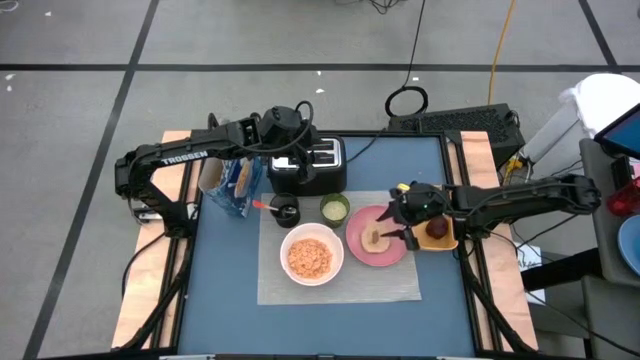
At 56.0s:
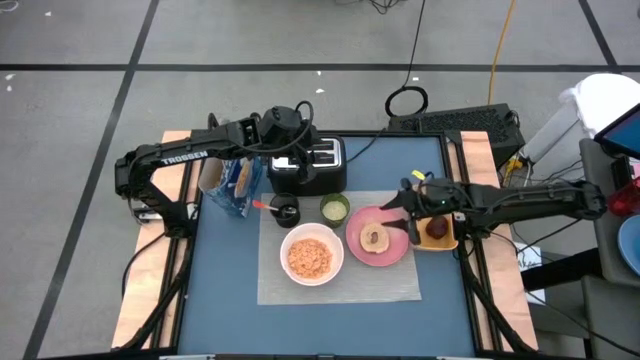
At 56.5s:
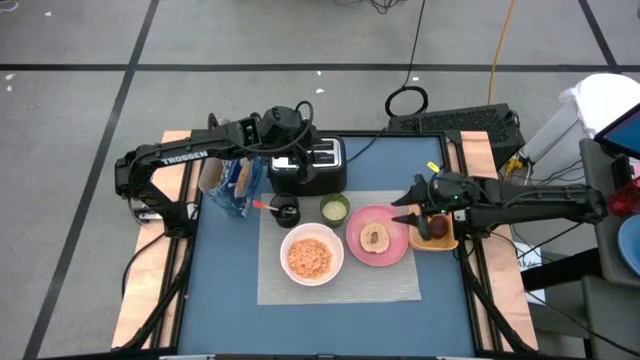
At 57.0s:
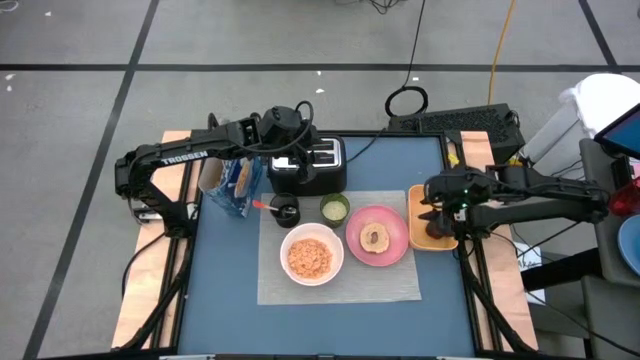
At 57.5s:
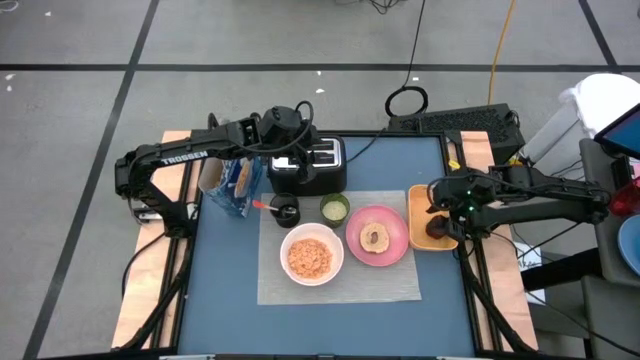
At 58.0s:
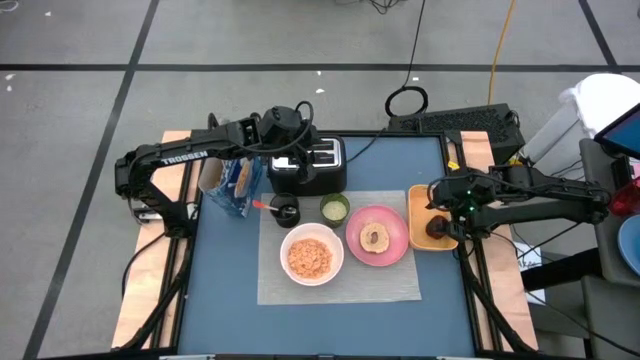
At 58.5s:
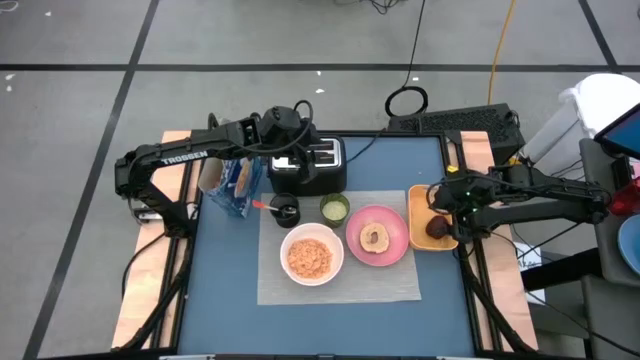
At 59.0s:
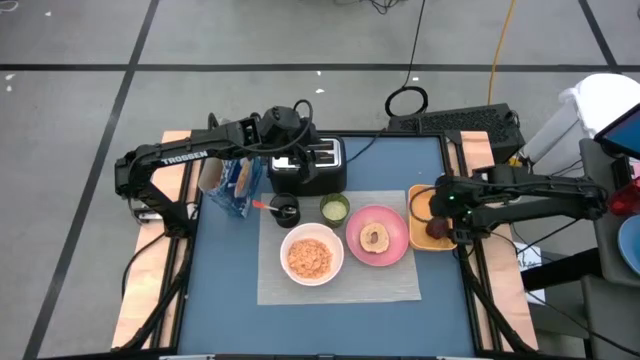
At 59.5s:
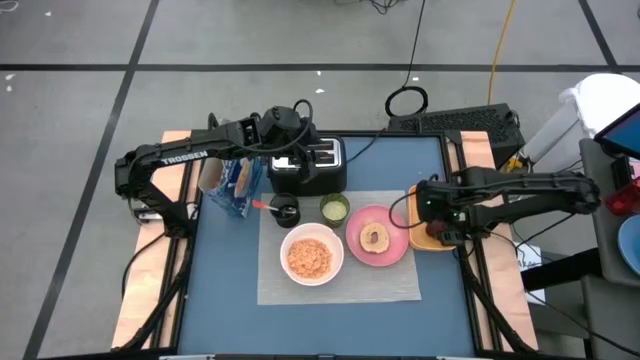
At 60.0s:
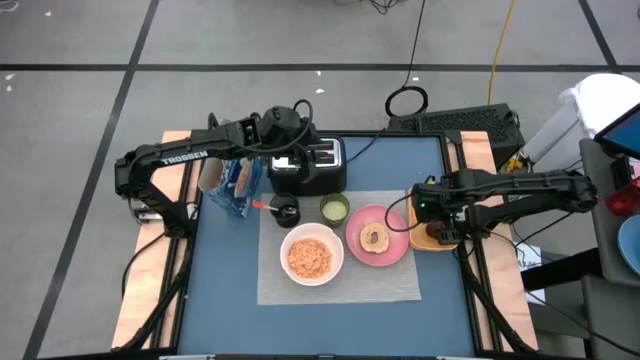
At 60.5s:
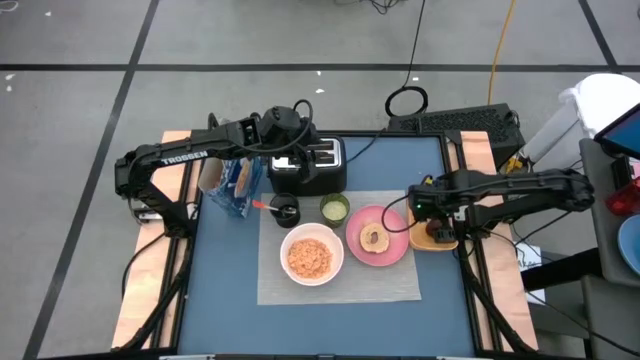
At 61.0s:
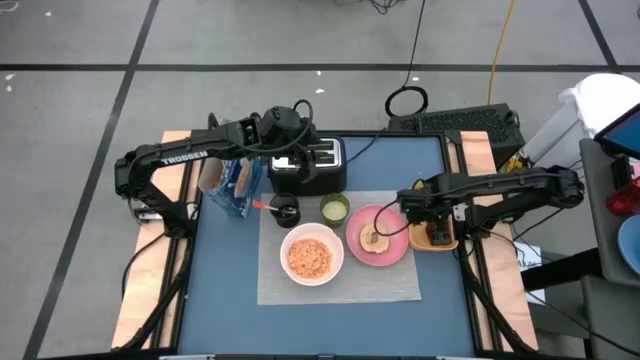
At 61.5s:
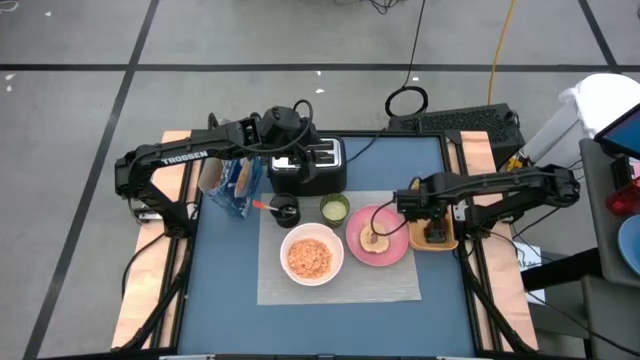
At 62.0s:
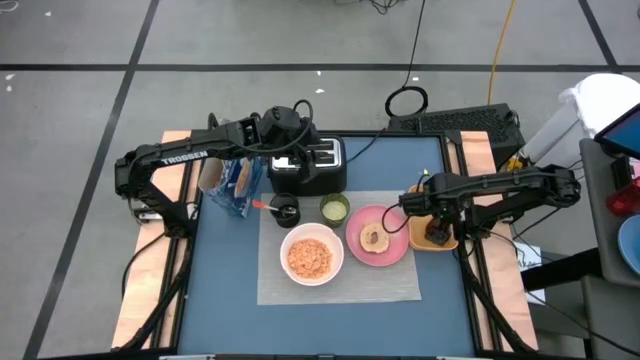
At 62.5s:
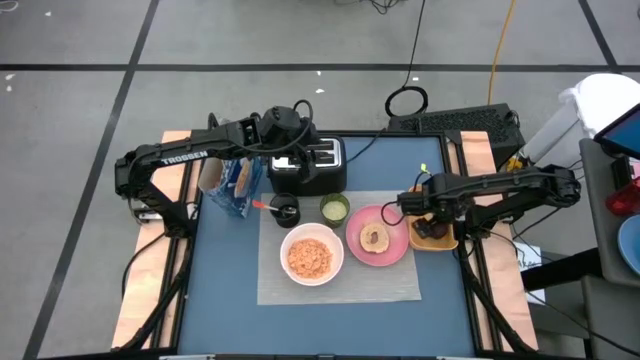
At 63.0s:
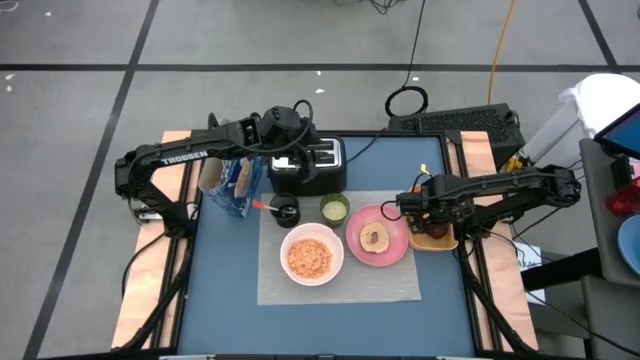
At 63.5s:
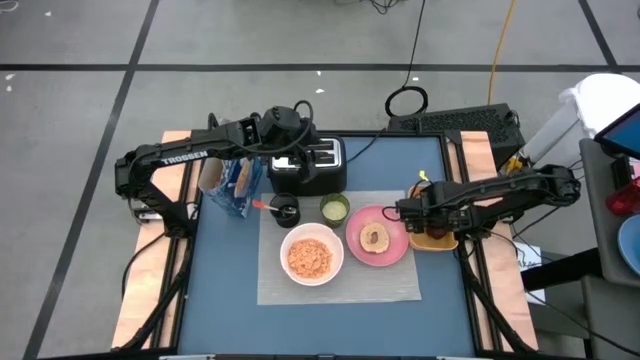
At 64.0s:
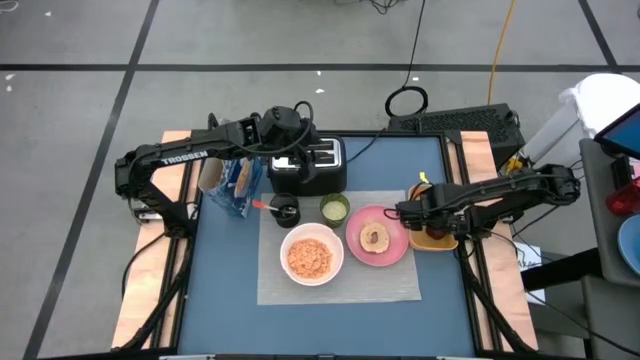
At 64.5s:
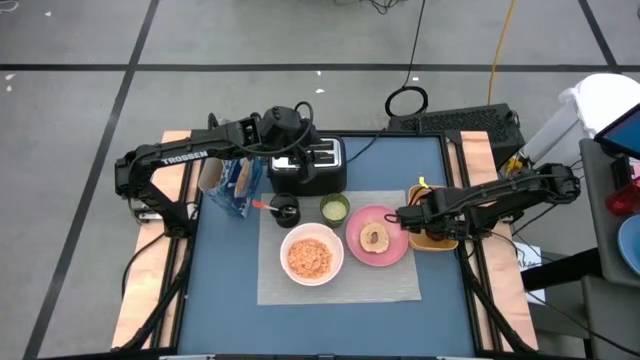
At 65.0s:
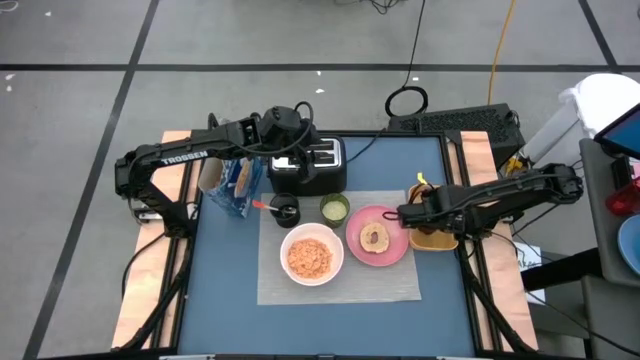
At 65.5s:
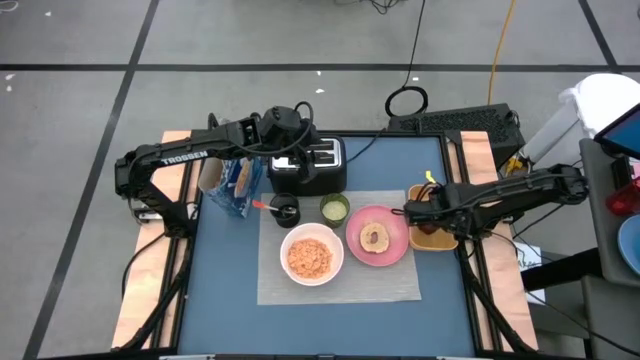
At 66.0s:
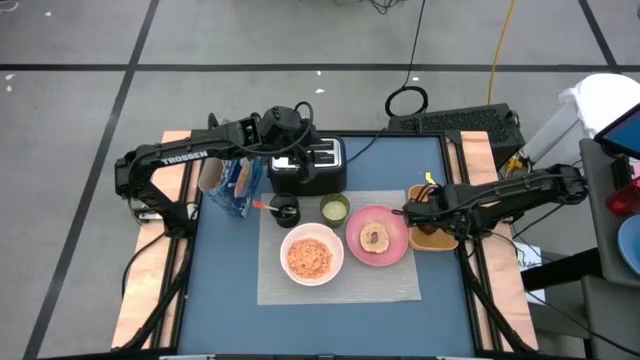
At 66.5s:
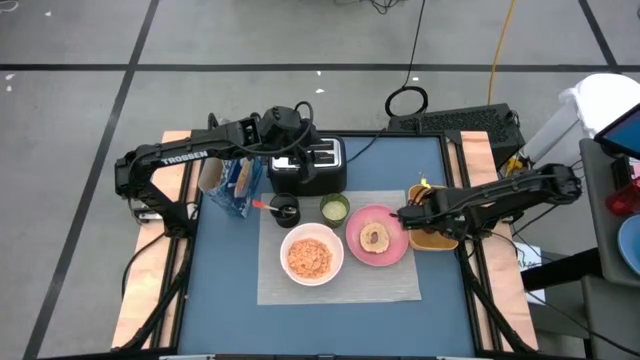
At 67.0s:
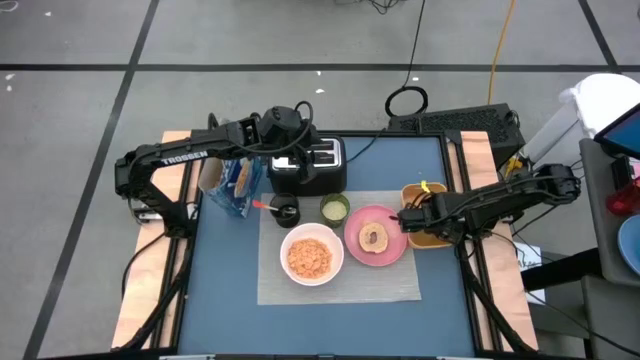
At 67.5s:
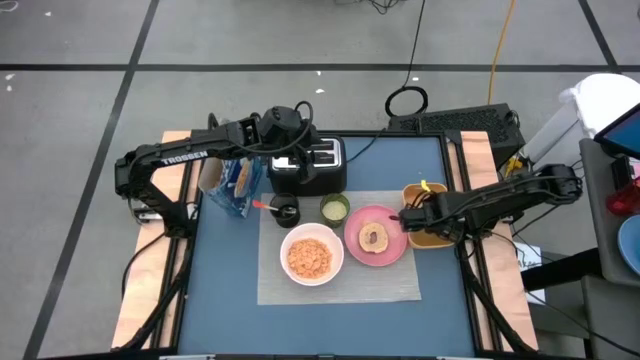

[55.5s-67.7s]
Task: Arrange a breakfast setting
Put the apple on the top right of the gray mat

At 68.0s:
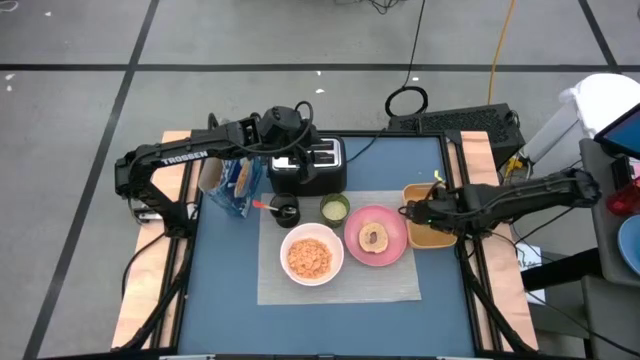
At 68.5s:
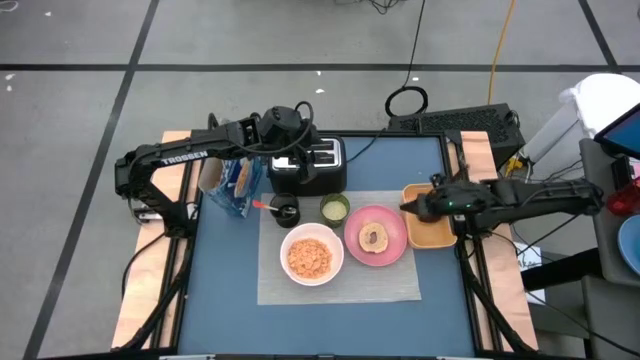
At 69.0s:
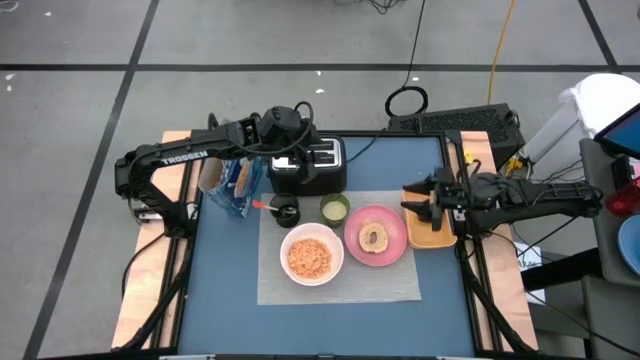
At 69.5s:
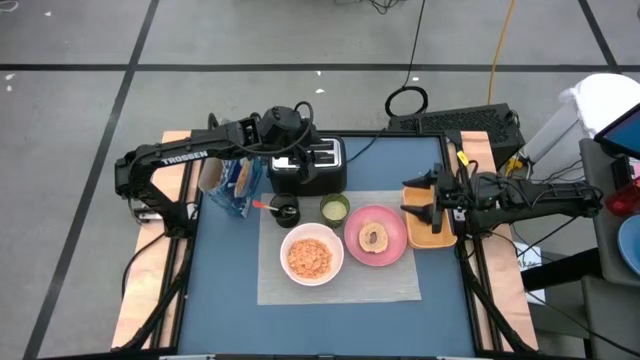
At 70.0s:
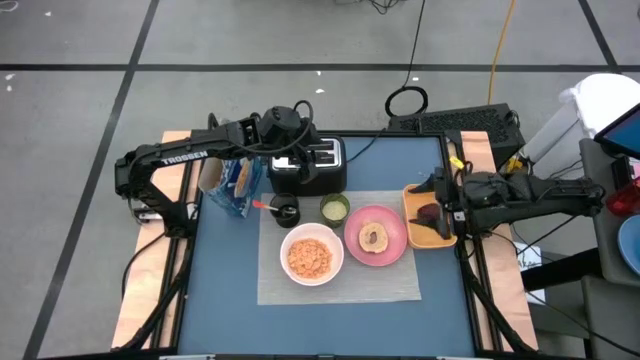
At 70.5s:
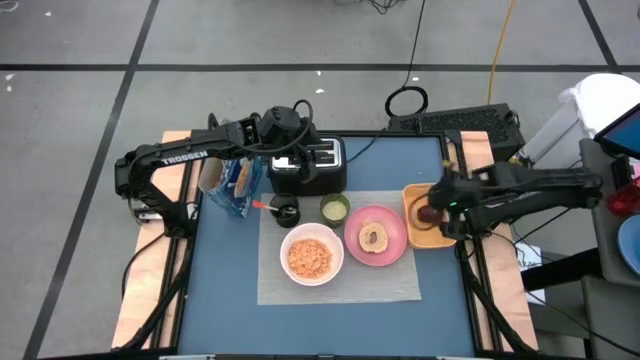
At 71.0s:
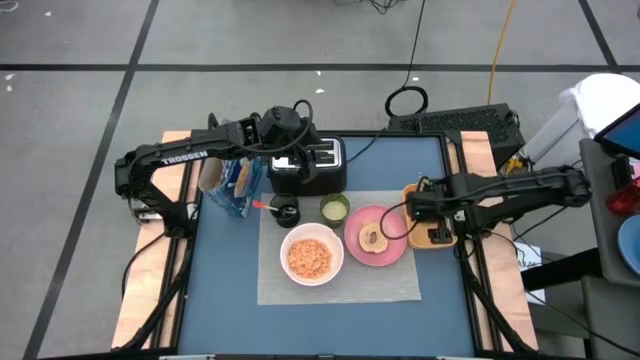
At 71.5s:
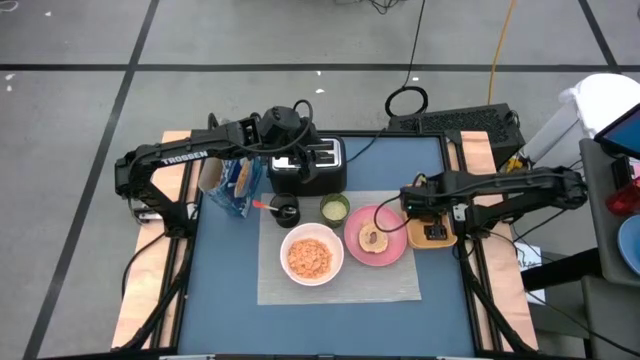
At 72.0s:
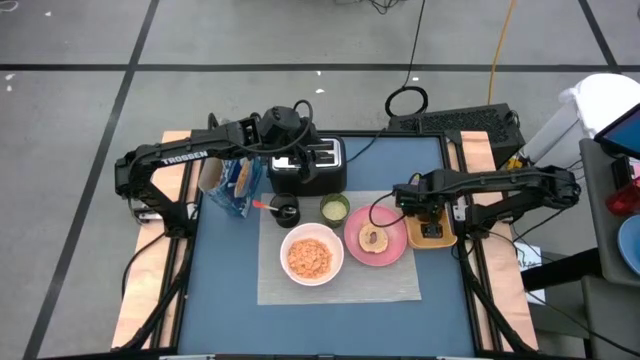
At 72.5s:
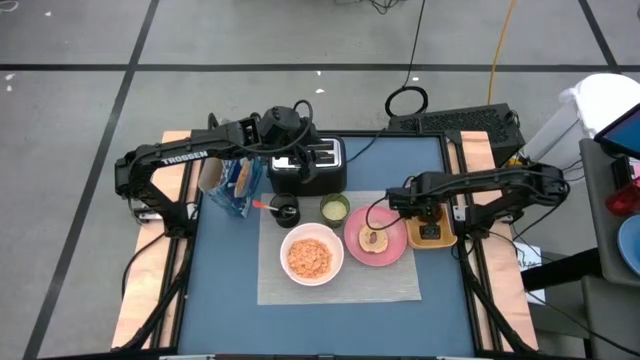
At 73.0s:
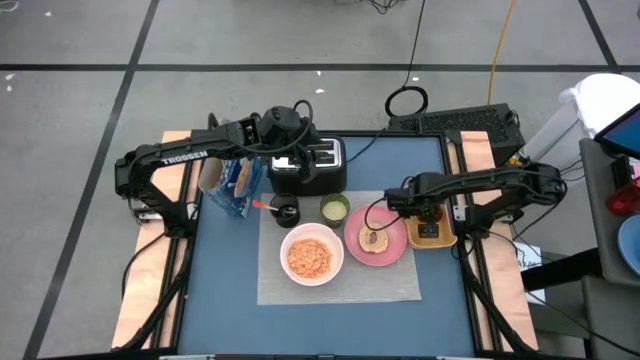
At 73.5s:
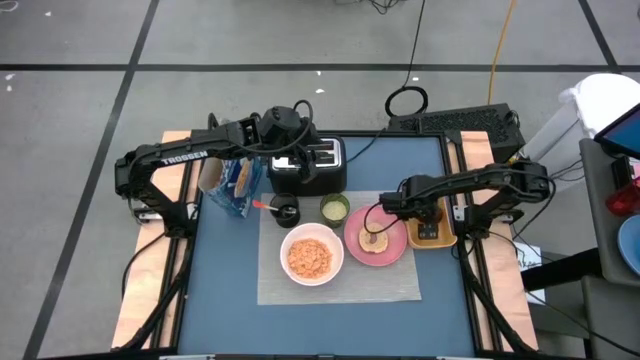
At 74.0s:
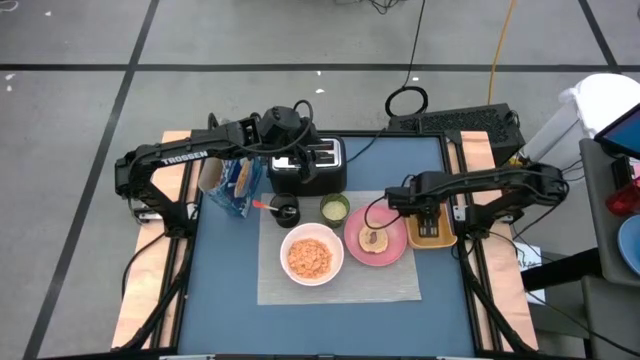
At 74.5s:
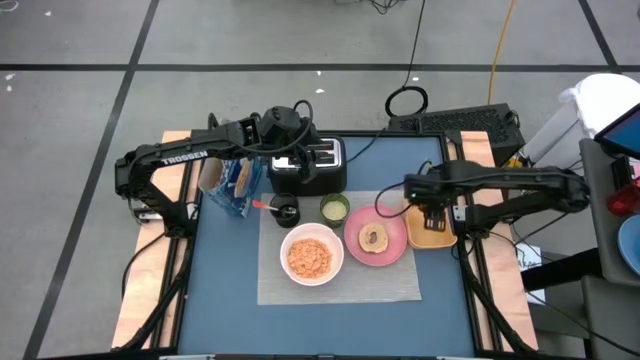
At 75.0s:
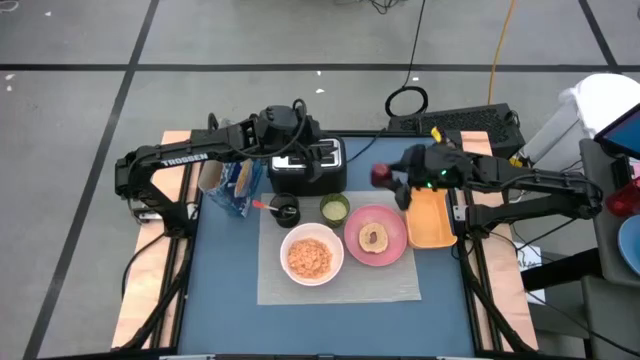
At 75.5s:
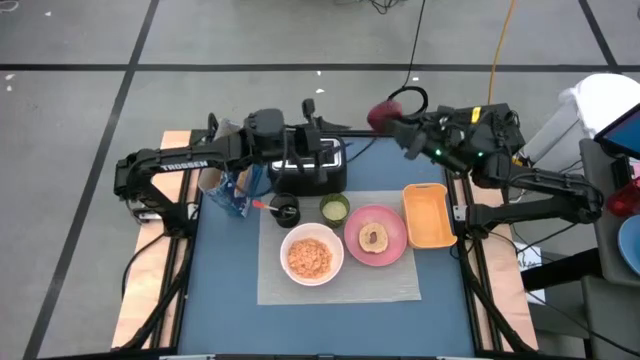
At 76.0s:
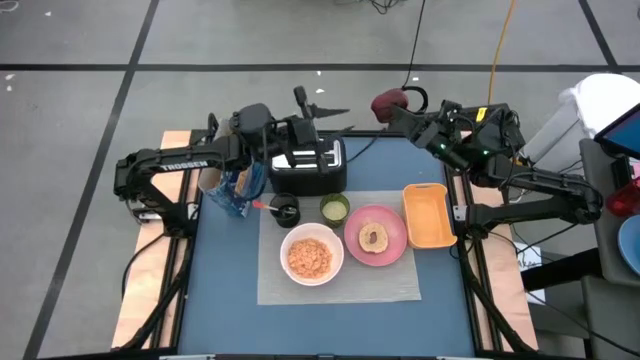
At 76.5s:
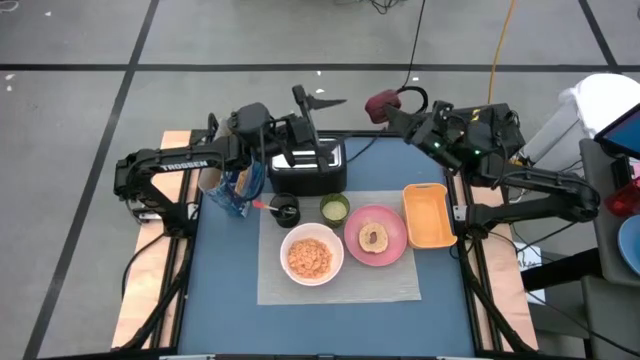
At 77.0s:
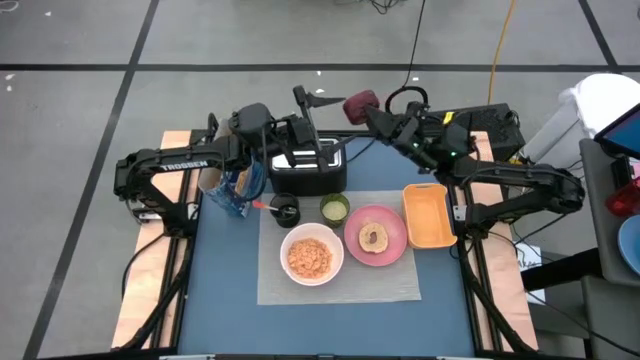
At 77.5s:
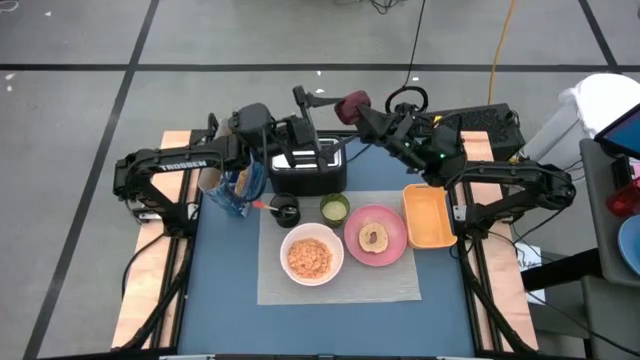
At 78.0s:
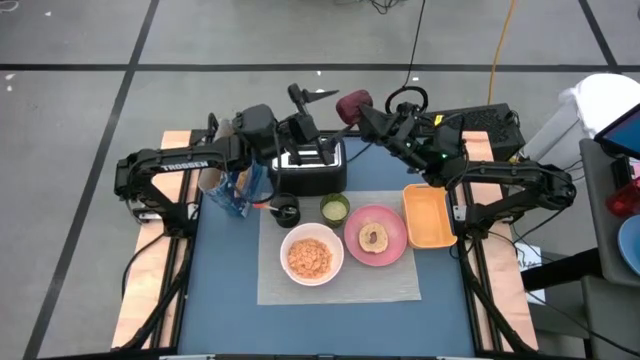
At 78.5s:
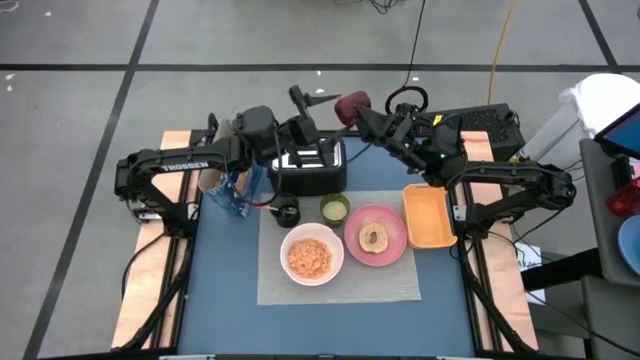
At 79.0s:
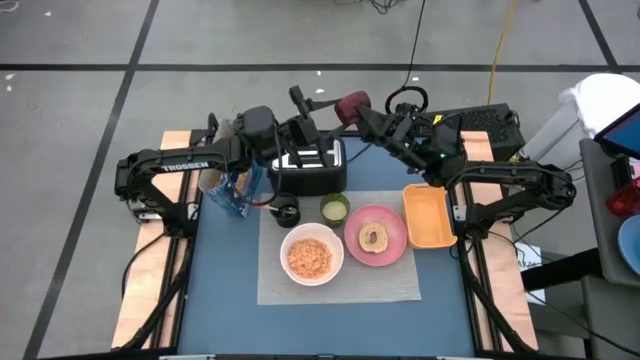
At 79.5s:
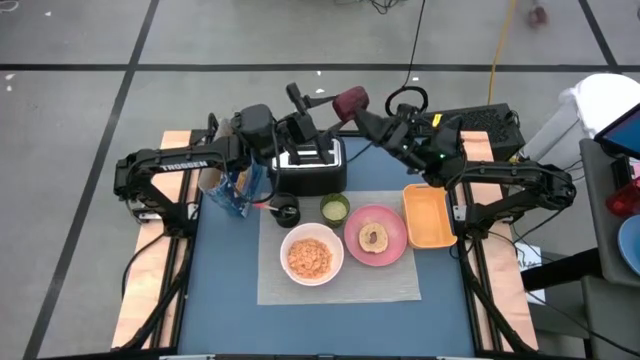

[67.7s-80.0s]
Put the apple on the top right of the gray mat
